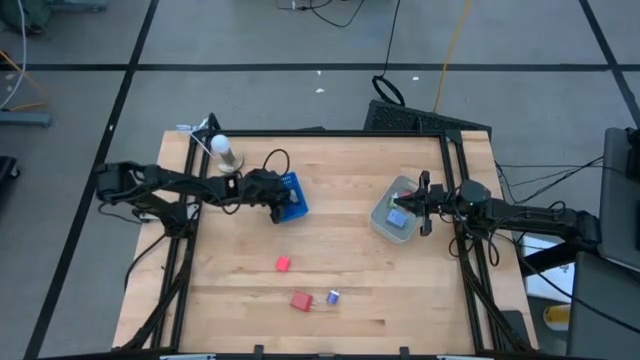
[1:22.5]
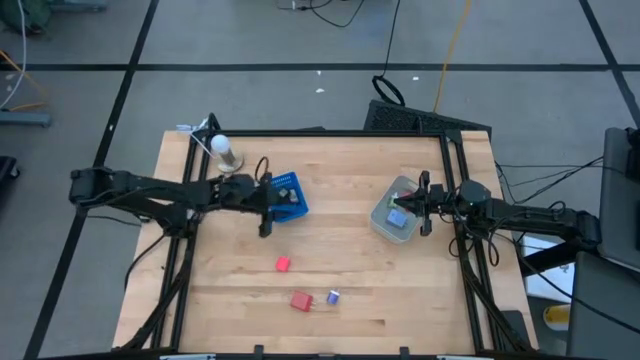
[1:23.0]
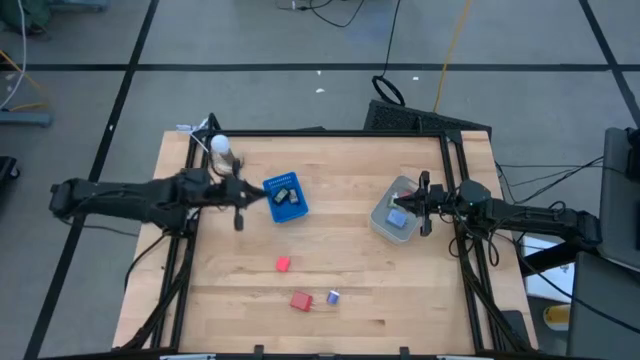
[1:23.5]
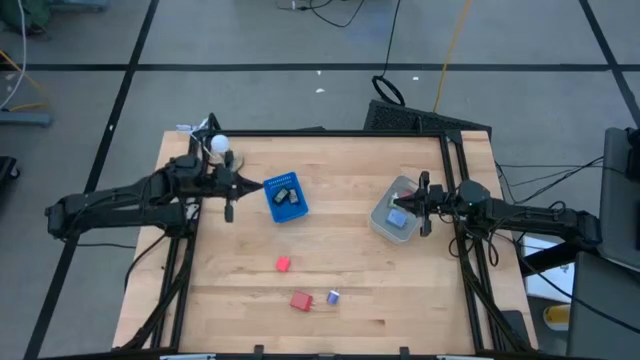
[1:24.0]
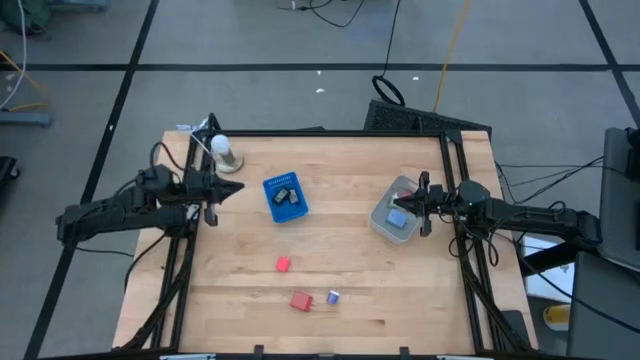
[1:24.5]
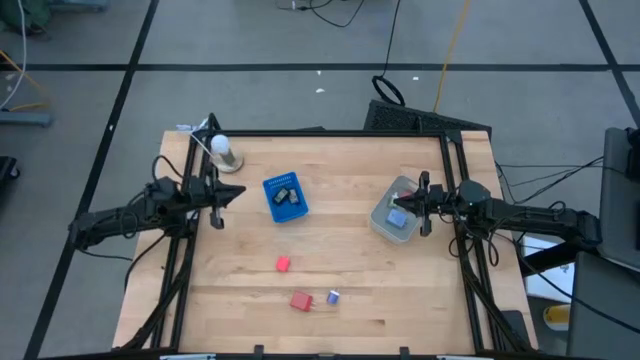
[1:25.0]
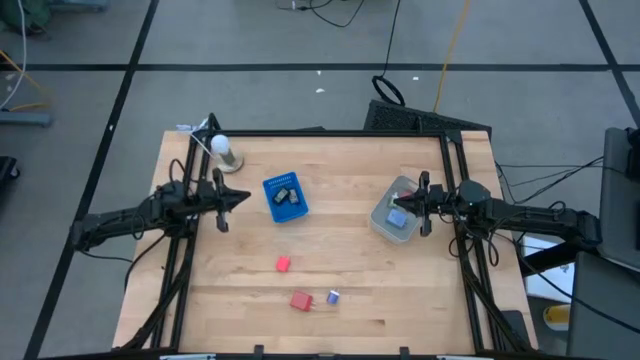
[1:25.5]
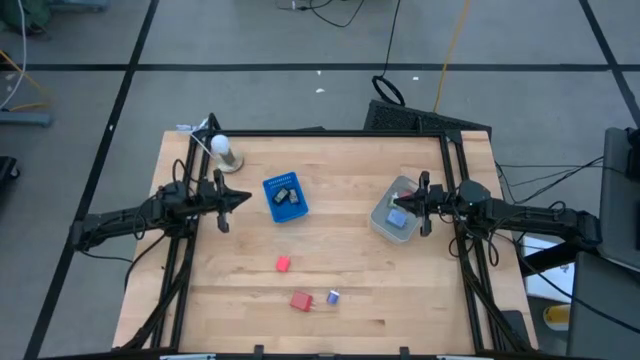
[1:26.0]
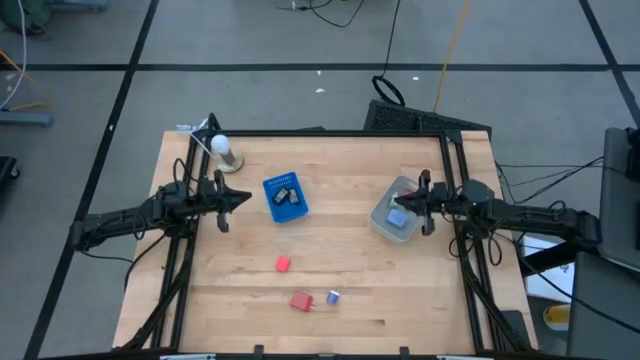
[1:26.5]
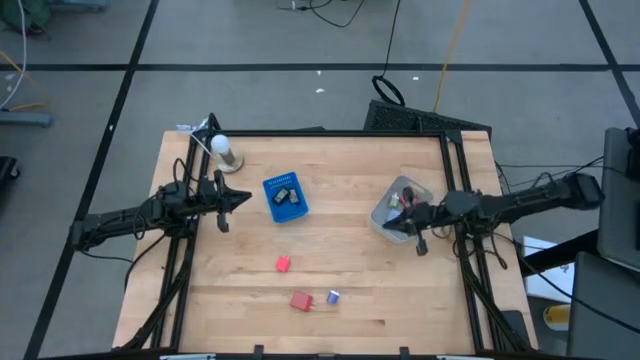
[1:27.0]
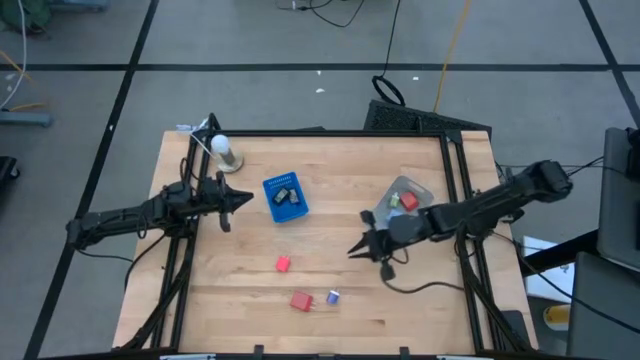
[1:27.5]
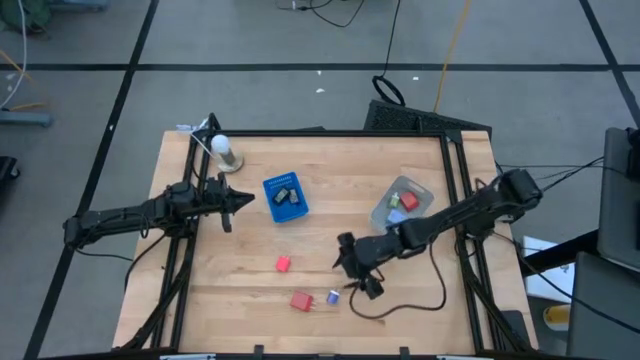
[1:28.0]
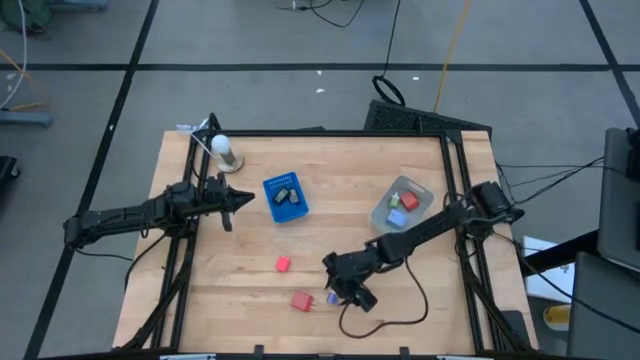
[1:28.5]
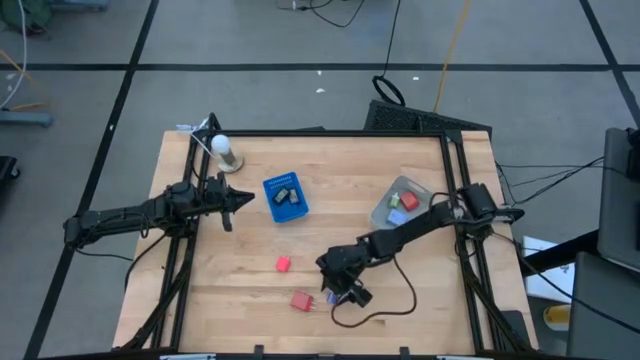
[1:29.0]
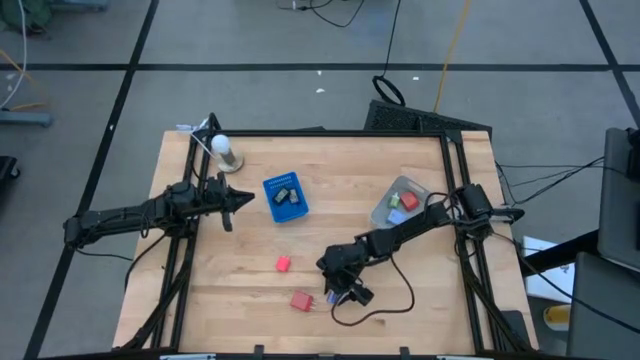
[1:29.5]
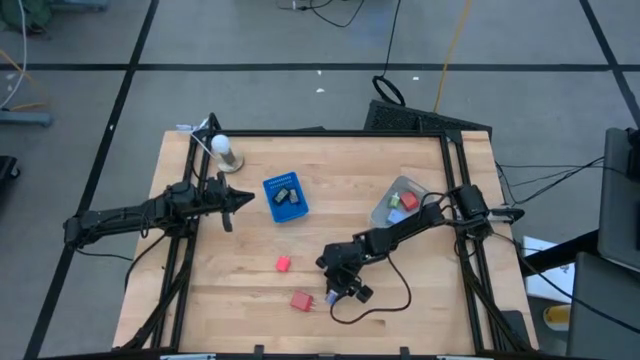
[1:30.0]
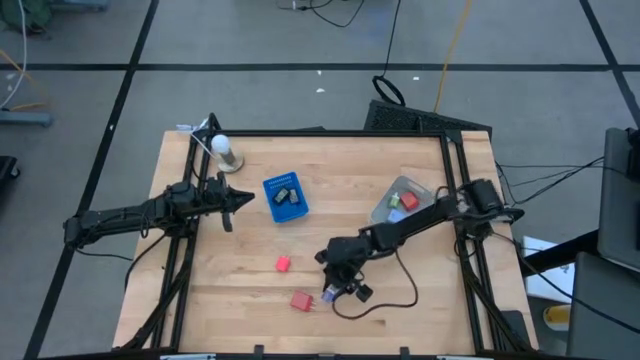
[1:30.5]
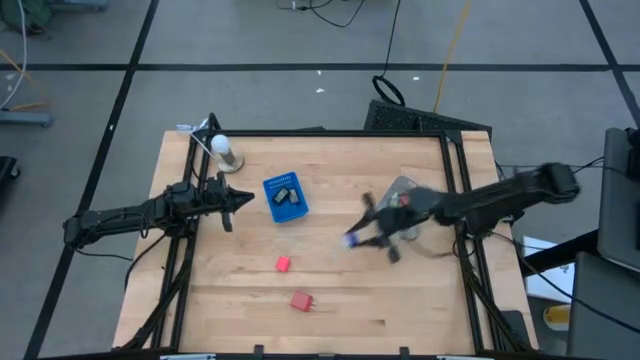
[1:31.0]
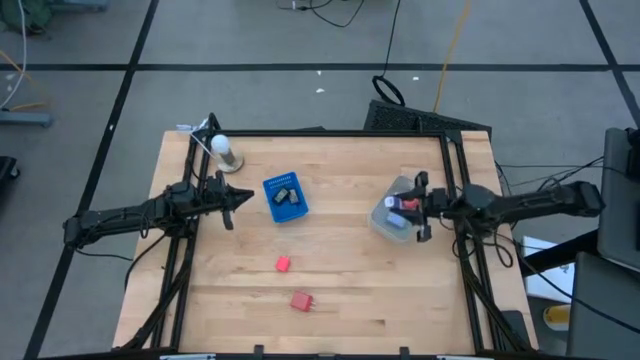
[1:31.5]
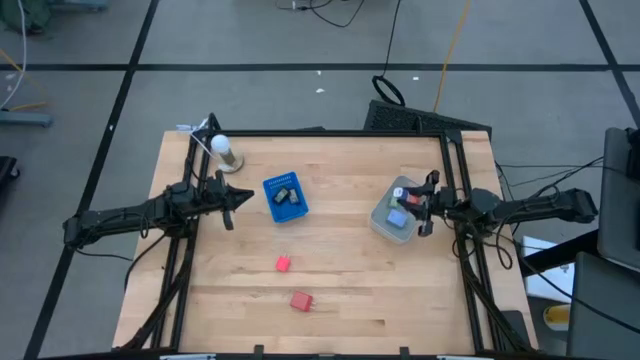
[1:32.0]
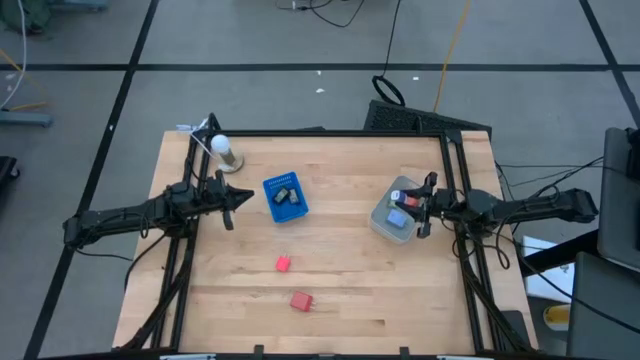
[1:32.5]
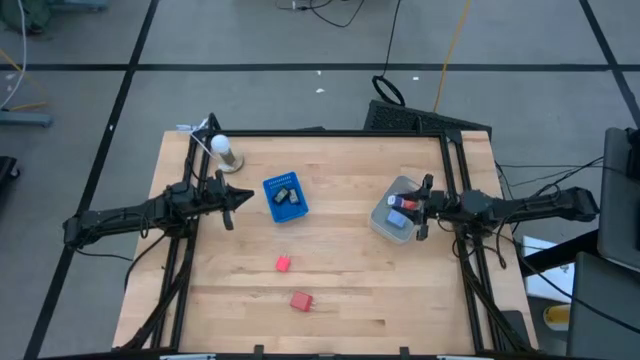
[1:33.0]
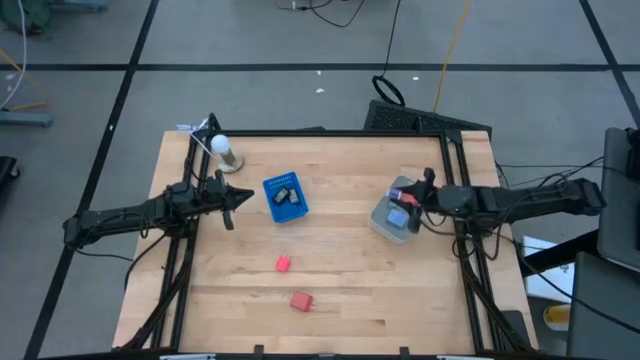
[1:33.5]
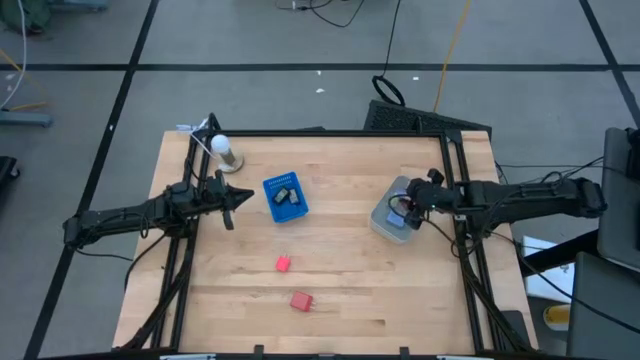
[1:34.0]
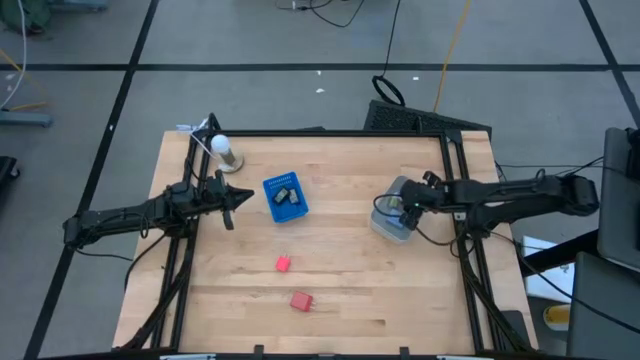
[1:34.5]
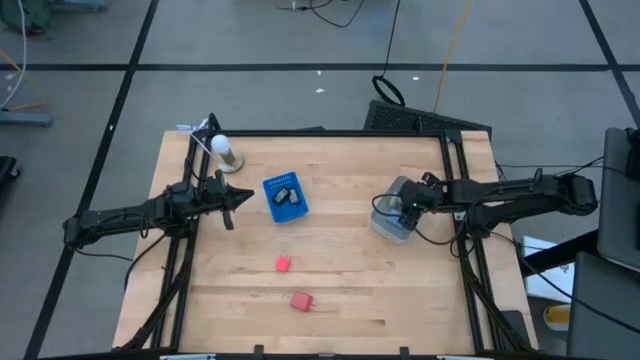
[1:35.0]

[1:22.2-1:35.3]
Task: Pick & Place Office items
Put the violet charger adapter into the gray bin

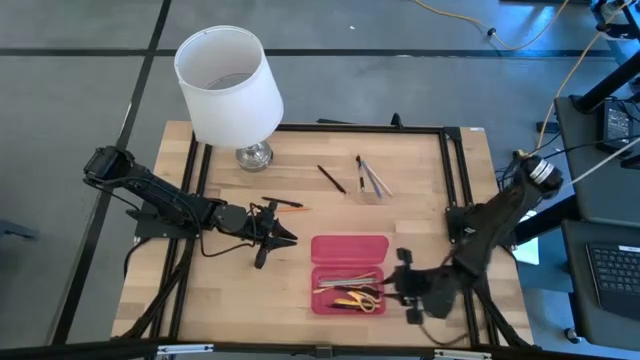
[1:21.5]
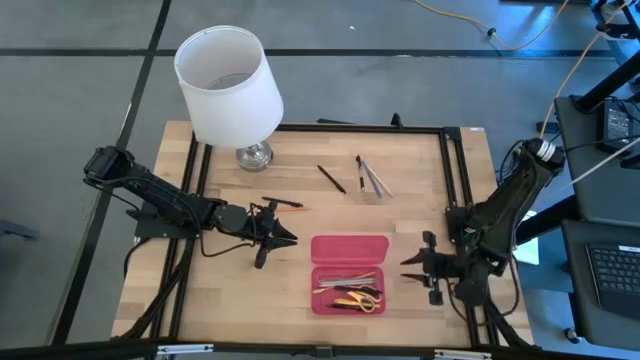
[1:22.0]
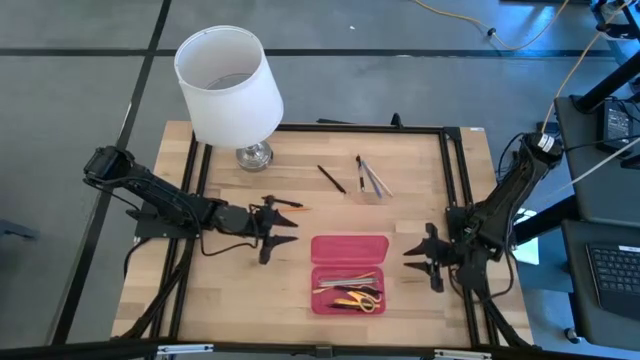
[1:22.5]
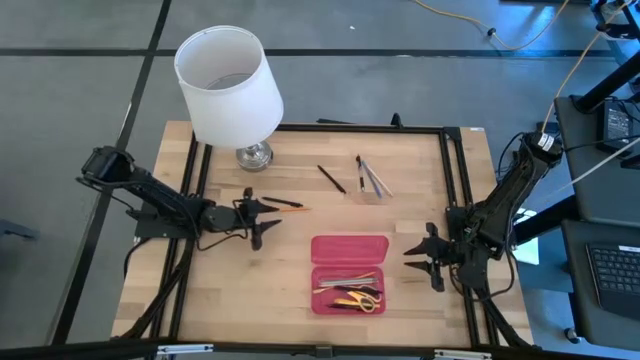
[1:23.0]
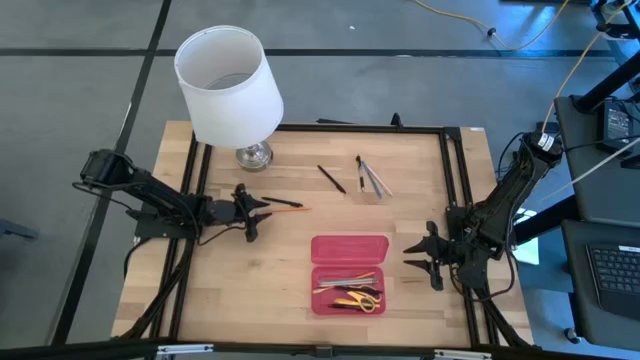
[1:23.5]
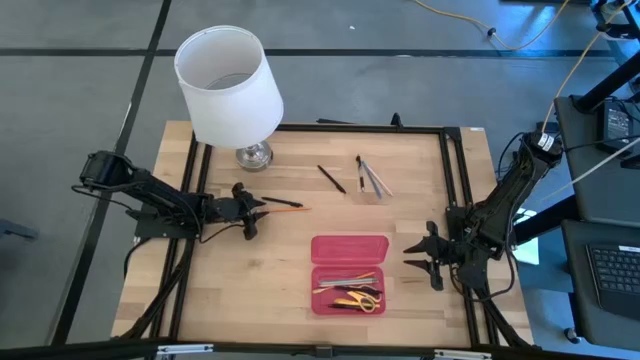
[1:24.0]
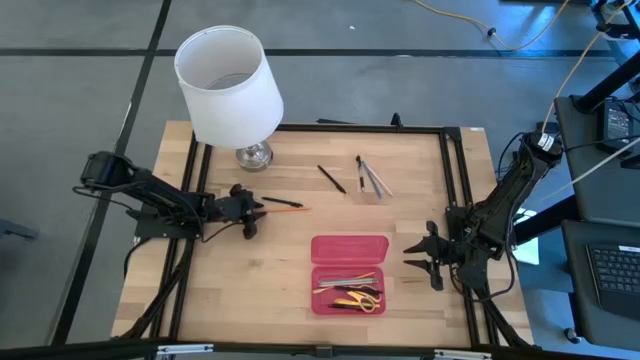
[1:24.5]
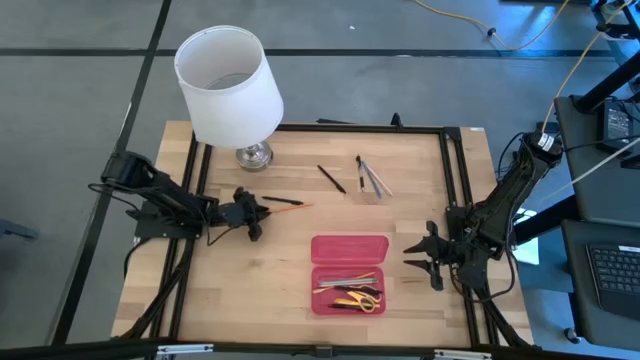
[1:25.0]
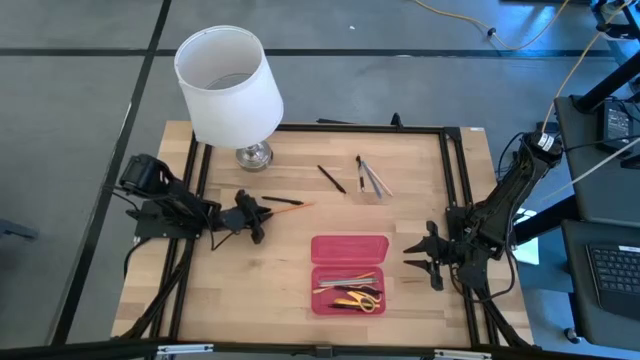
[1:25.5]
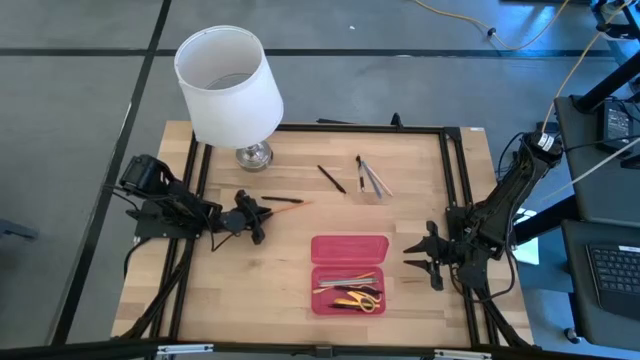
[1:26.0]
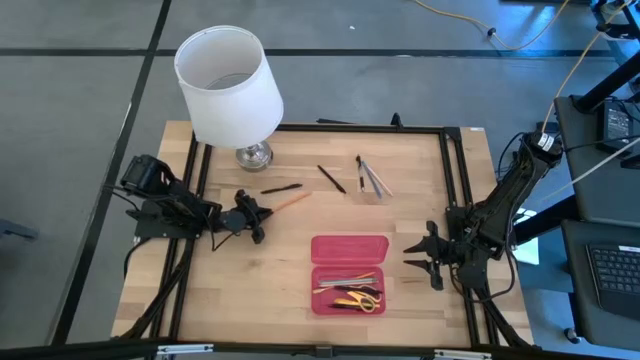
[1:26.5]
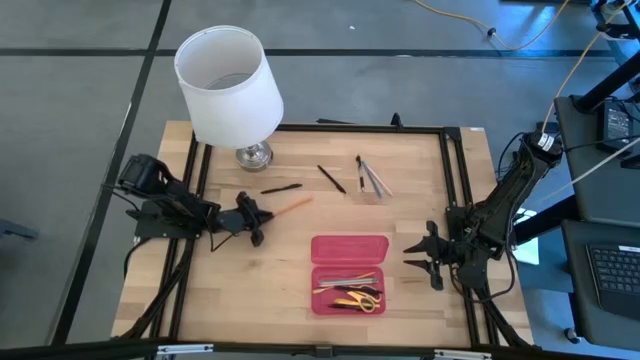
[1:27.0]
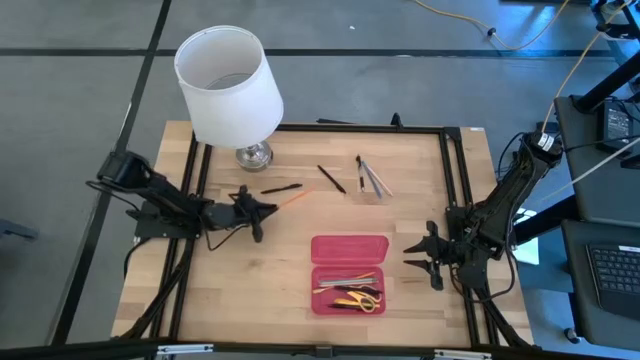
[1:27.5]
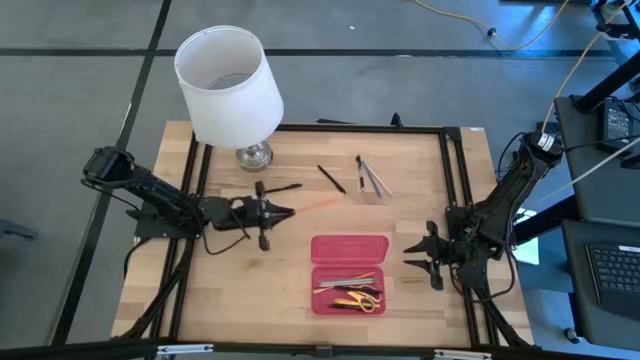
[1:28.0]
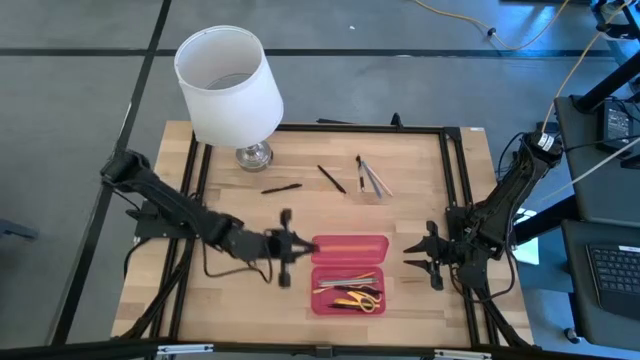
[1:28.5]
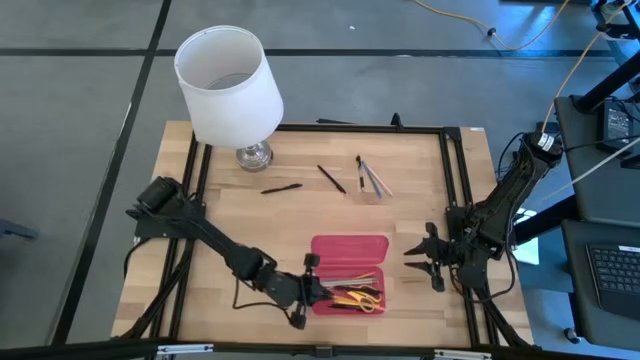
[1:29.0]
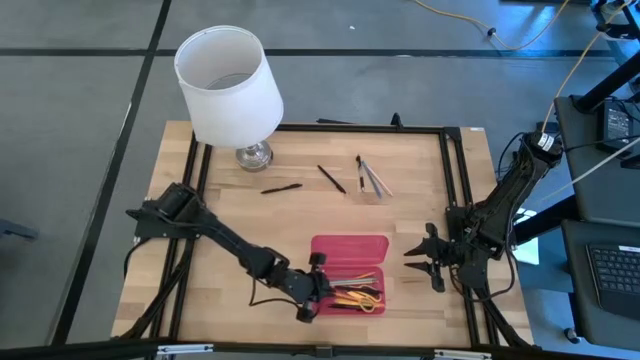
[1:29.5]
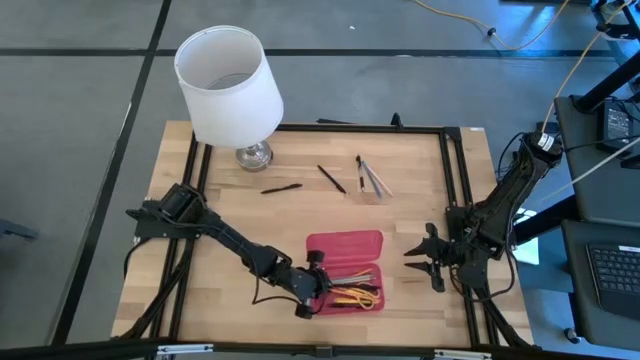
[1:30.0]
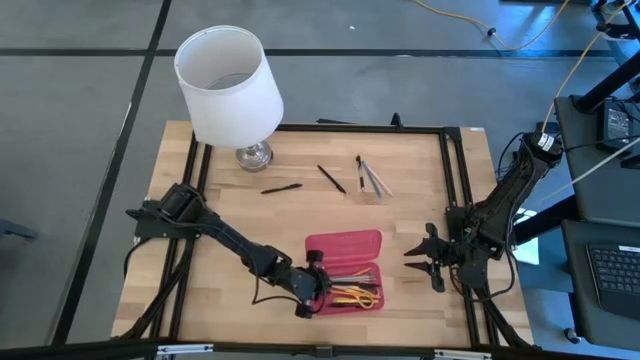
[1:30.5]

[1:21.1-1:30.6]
Task: Pick & place school supplies into a supply box
Put the yellow supply into the pink supply box
